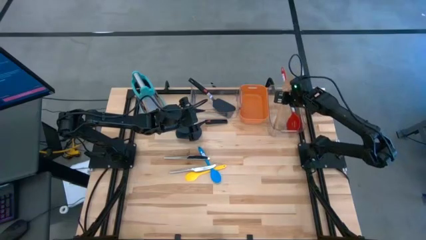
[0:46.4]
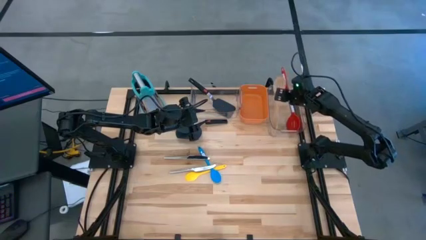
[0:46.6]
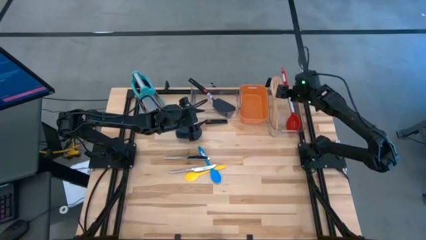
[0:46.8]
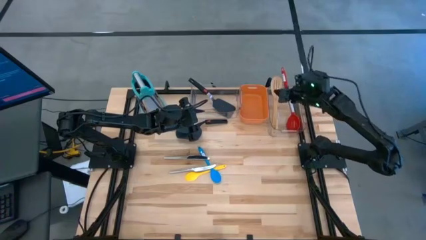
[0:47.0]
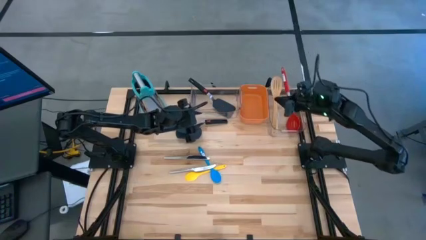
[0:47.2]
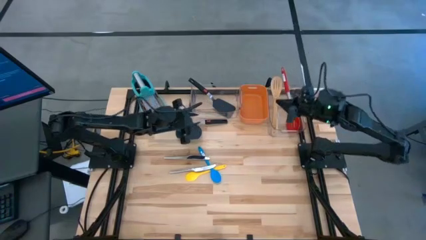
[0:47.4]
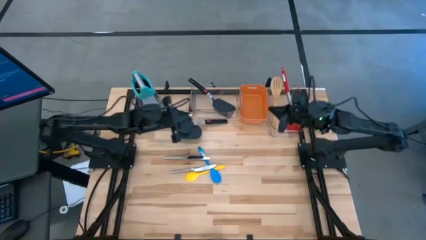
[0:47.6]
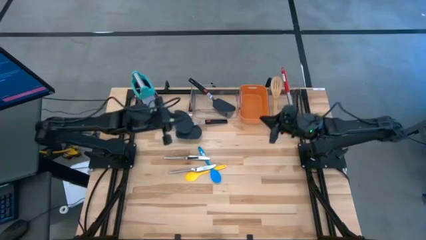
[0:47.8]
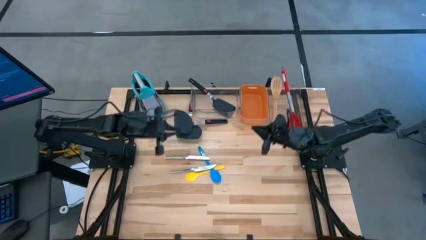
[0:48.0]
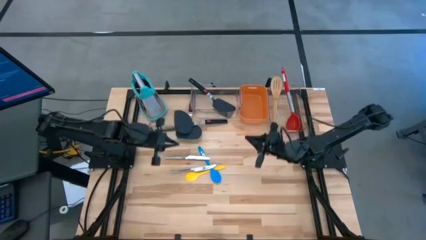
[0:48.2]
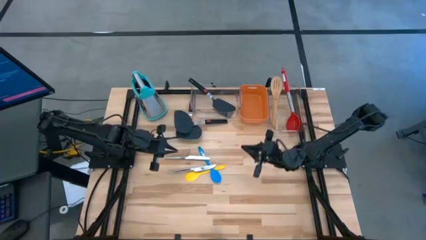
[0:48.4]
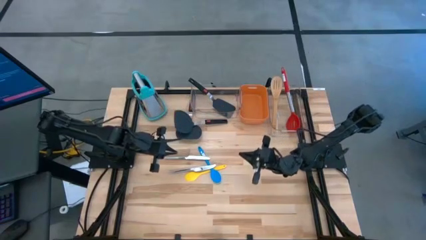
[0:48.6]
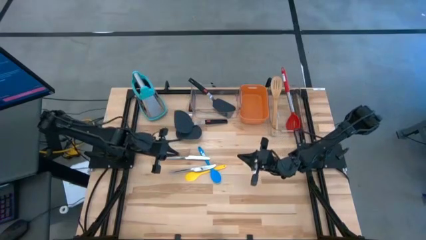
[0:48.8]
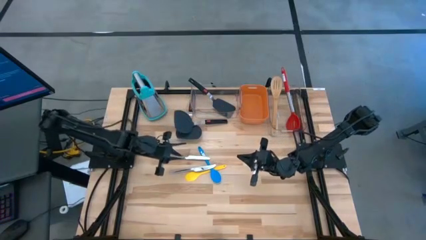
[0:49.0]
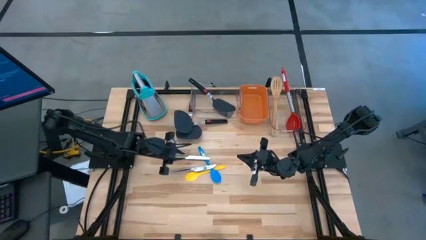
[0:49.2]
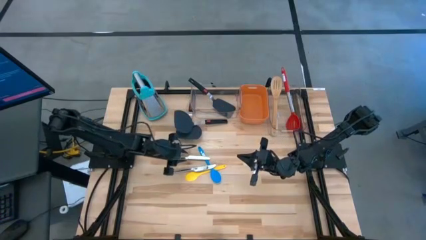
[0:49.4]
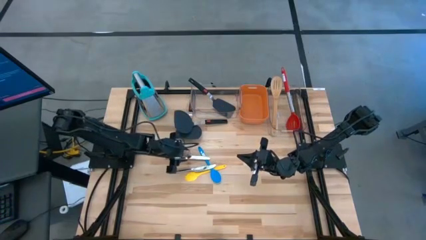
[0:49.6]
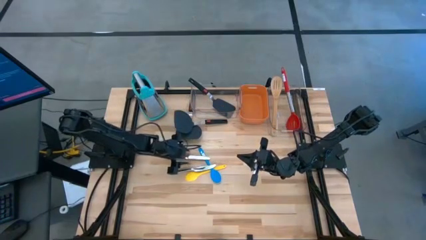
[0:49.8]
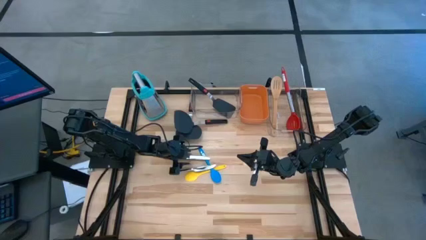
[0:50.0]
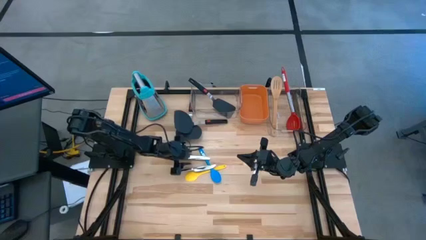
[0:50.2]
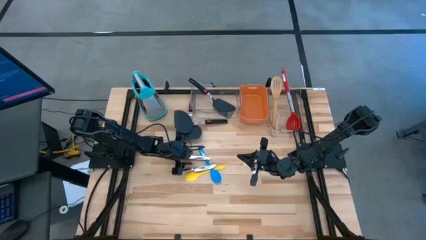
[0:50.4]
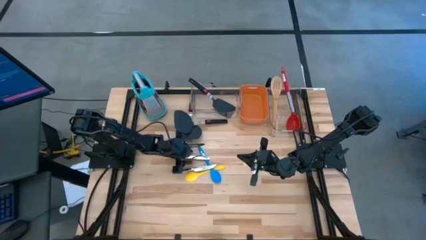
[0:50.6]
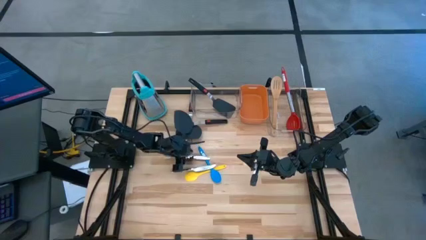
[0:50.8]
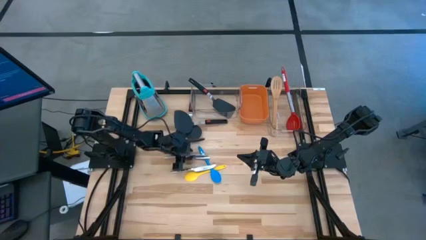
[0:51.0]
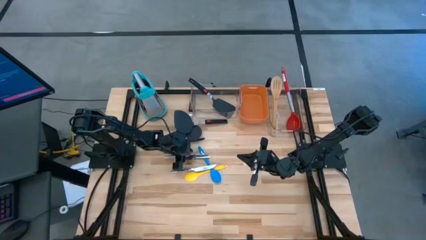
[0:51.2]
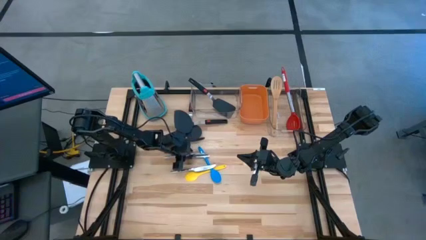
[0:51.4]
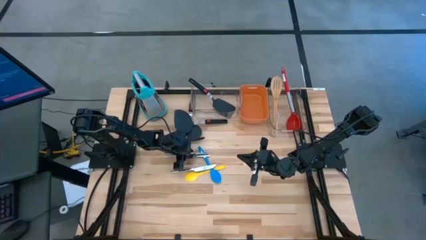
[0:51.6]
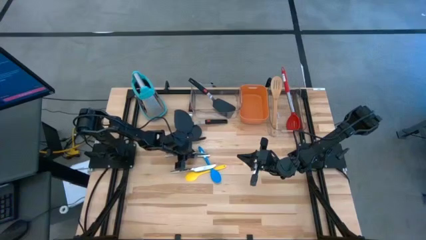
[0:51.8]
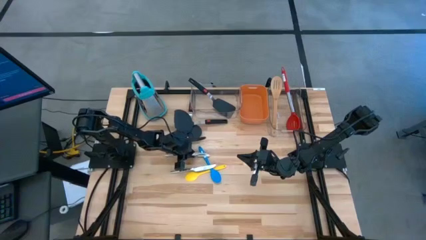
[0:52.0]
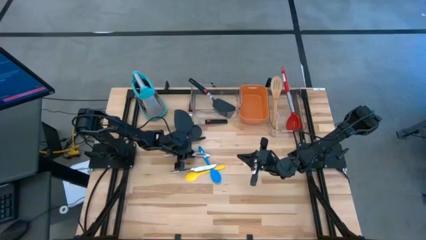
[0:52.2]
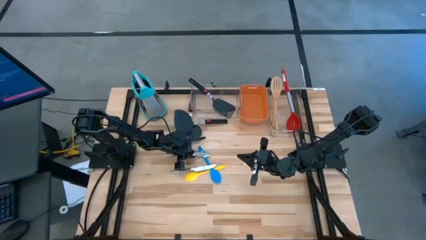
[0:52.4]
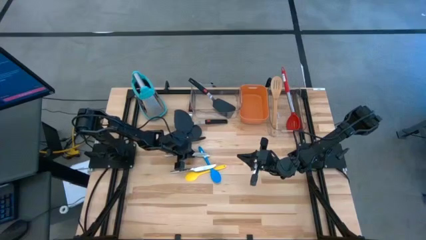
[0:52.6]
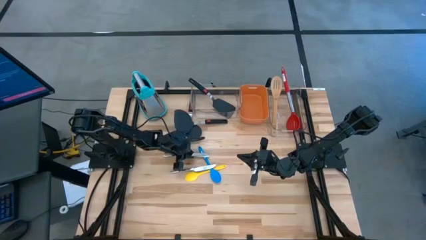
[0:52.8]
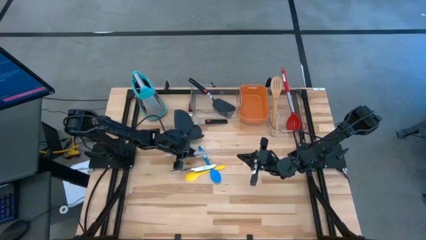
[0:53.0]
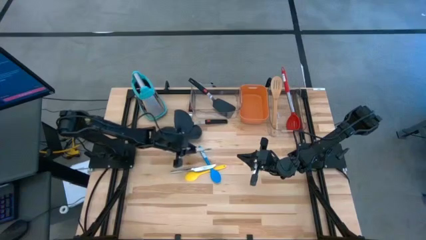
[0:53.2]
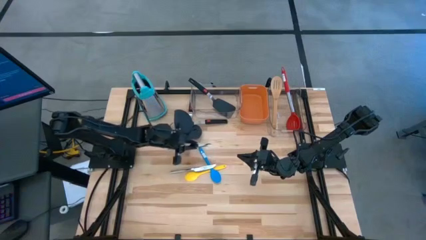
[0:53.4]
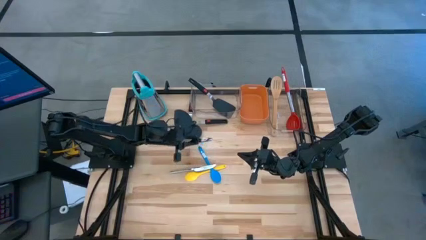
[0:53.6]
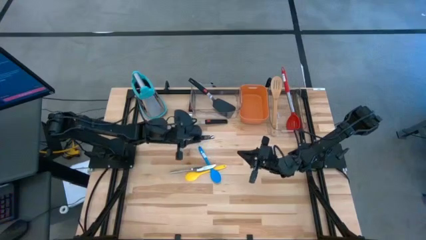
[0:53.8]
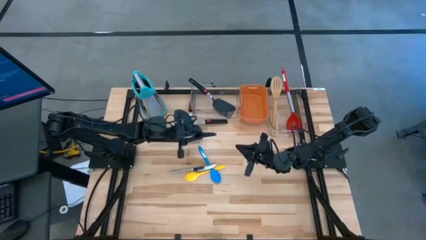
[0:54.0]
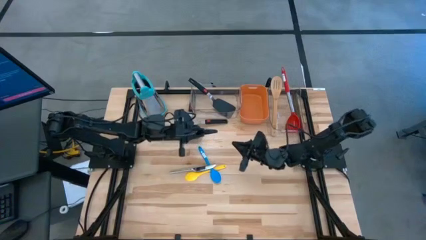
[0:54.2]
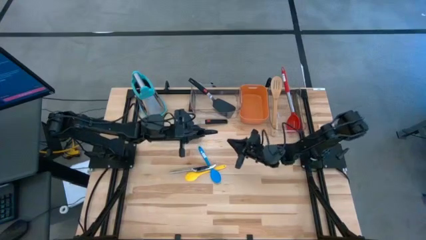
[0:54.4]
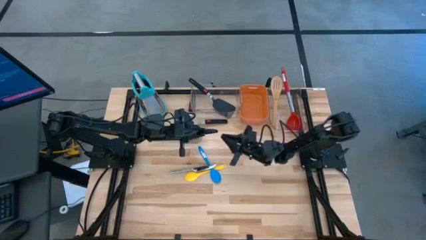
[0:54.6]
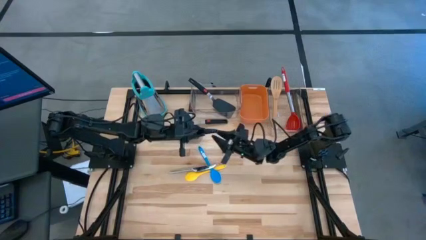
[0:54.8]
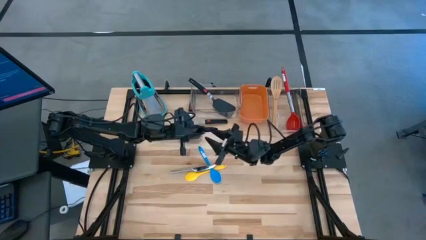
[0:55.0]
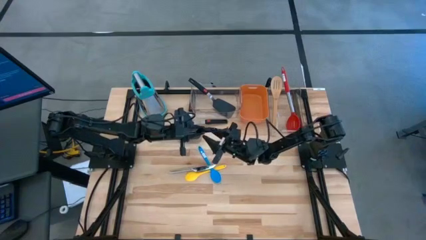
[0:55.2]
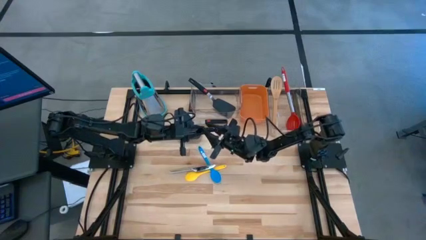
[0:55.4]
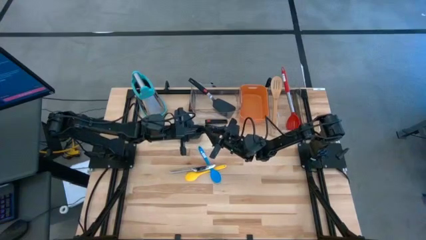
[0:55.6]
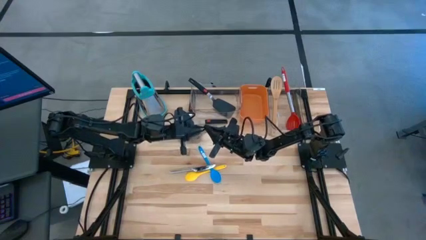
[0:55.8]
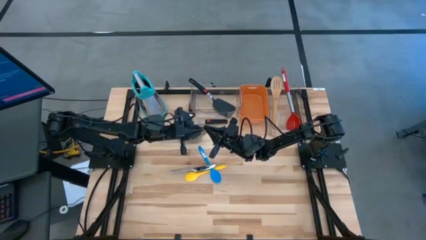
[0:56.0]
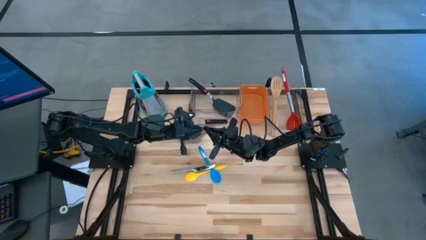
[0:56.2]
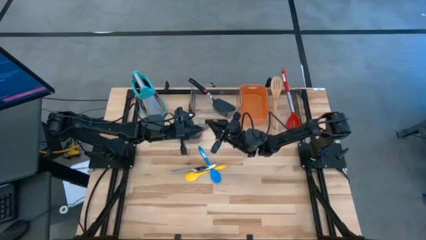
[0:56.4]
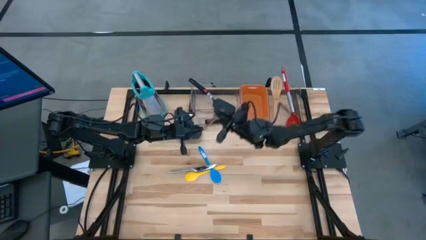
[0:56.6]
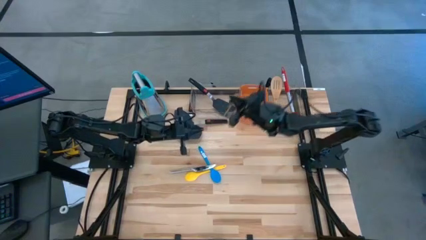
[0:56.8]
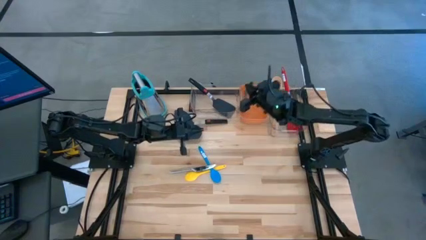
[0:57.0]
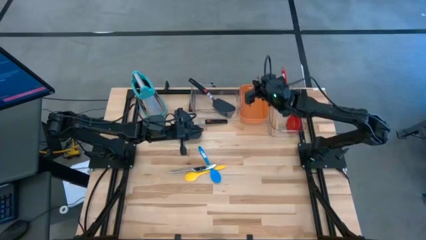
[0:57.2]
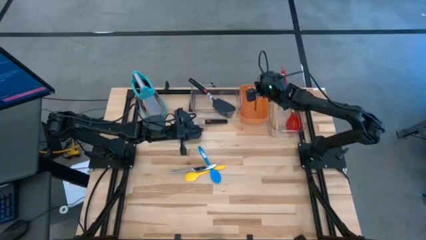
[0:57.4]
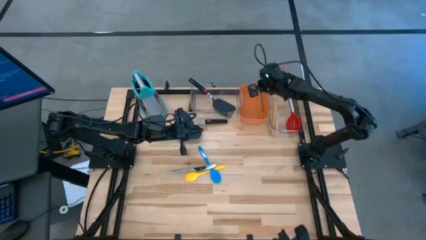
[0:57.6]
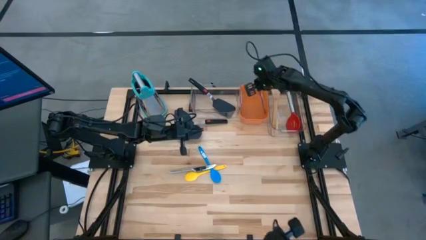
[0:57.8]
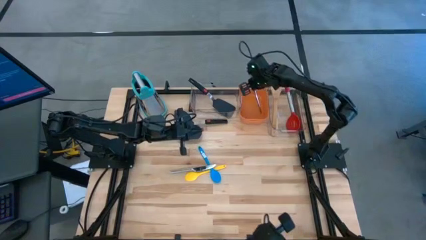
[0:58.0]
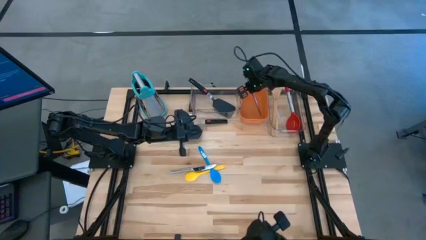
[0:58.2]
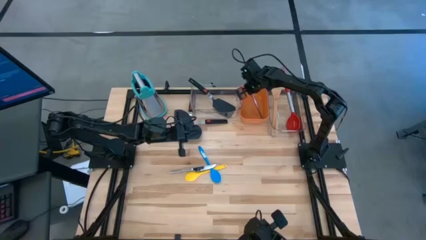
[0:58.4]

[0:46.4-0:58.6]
Task: Pick & Place Kitchen Items
Put the top butter knife in the orange bin
